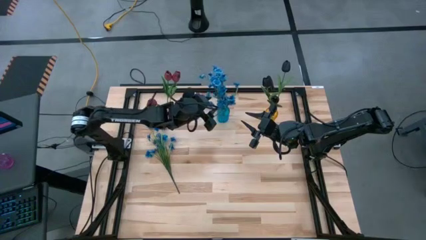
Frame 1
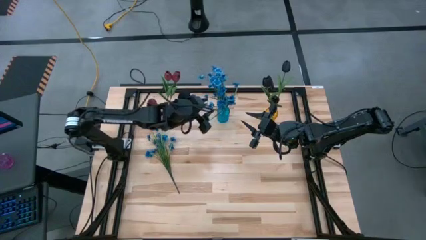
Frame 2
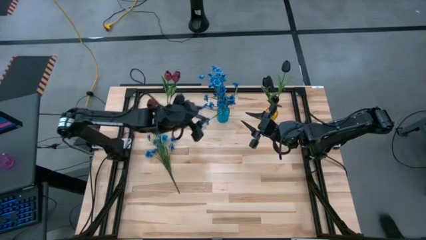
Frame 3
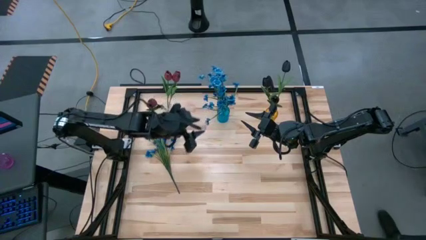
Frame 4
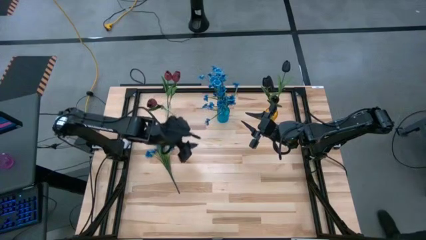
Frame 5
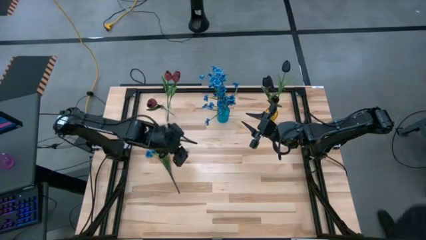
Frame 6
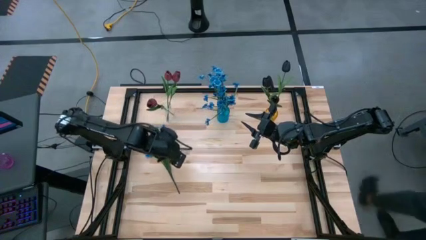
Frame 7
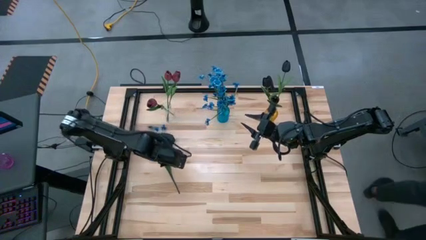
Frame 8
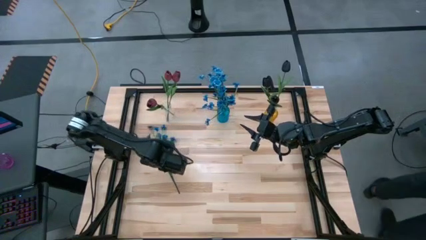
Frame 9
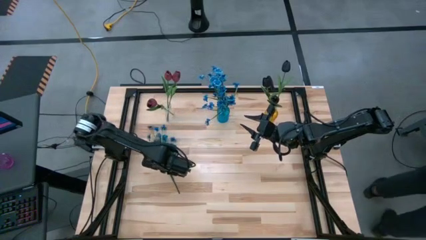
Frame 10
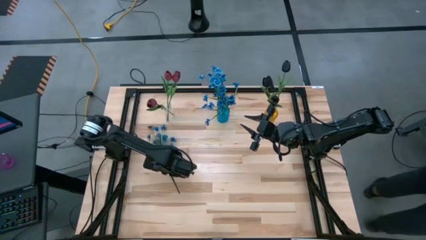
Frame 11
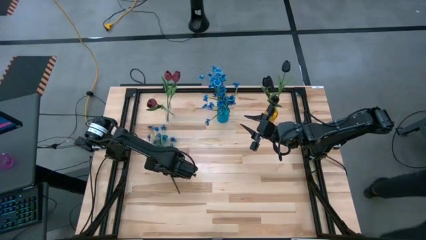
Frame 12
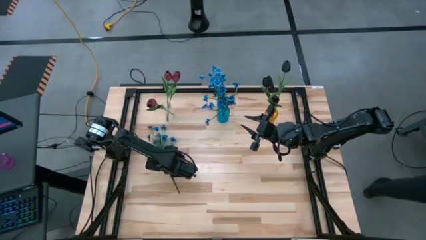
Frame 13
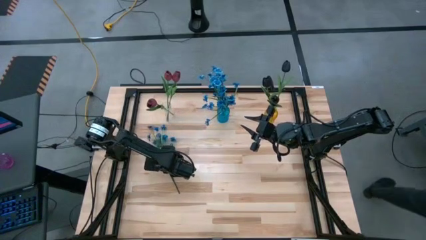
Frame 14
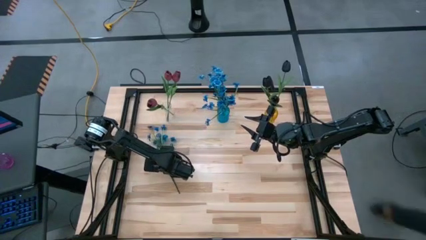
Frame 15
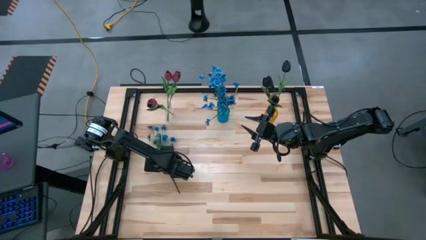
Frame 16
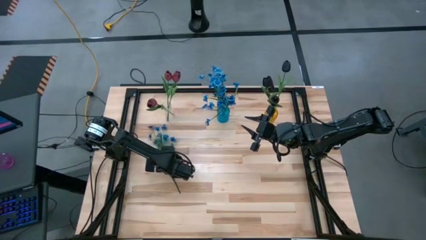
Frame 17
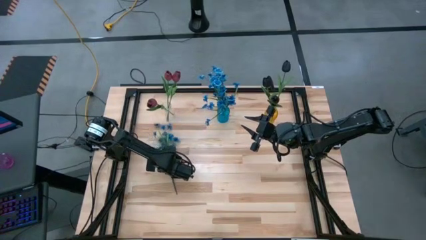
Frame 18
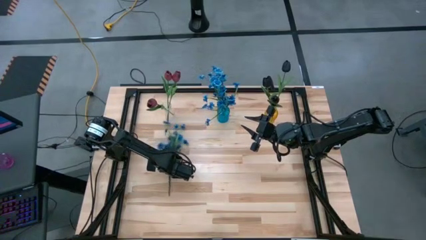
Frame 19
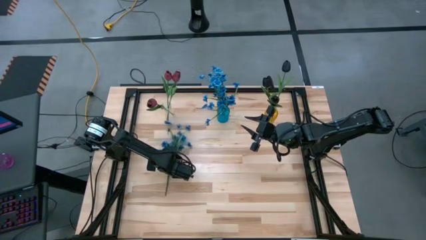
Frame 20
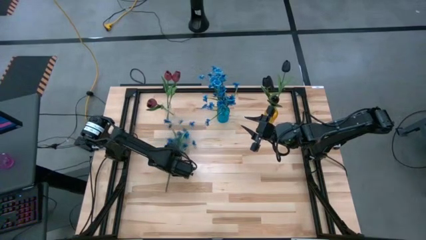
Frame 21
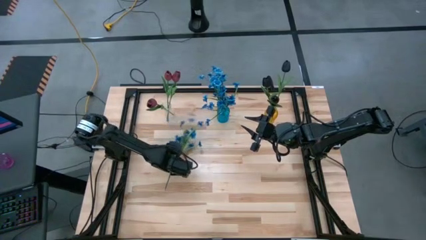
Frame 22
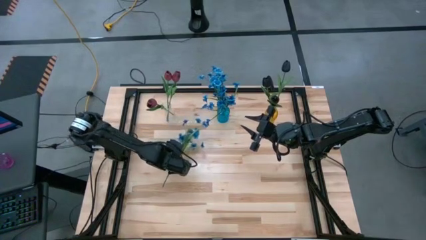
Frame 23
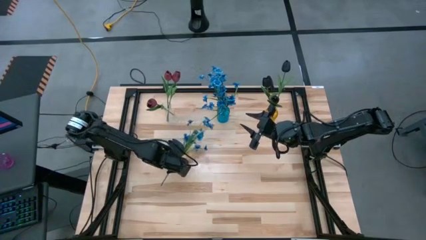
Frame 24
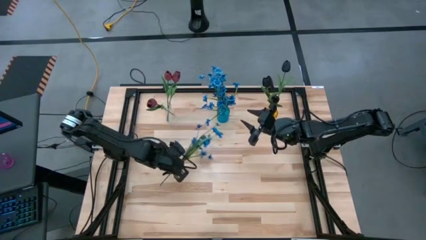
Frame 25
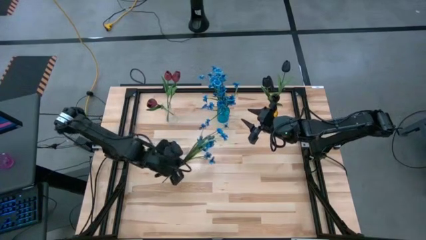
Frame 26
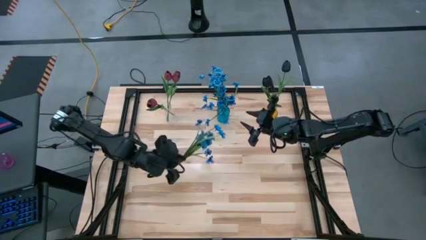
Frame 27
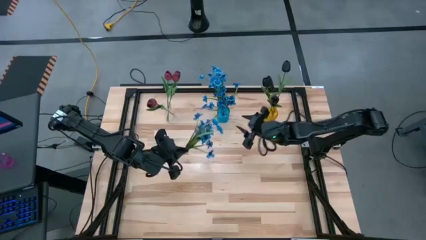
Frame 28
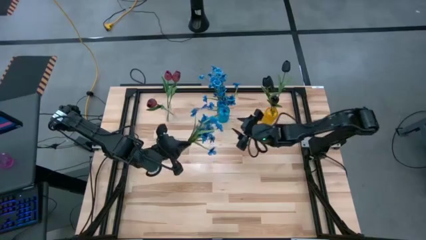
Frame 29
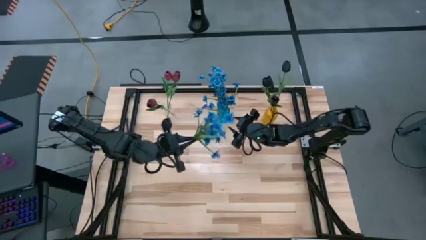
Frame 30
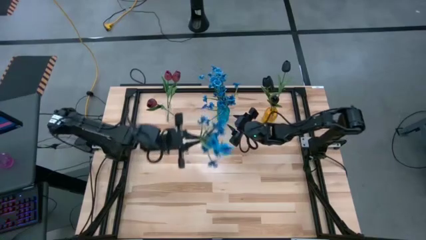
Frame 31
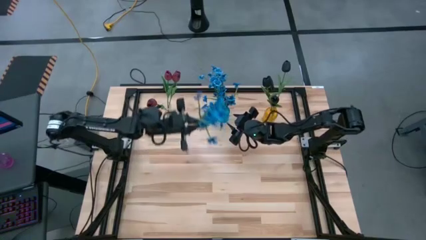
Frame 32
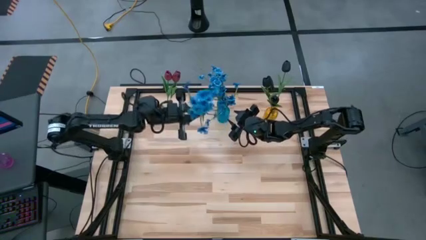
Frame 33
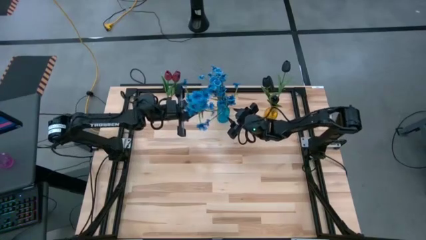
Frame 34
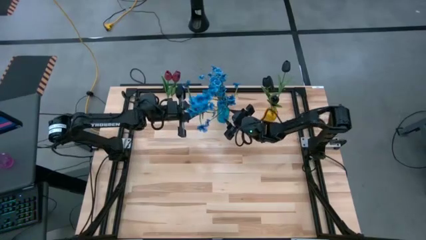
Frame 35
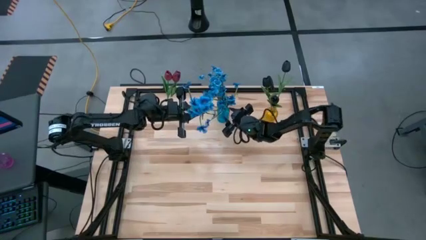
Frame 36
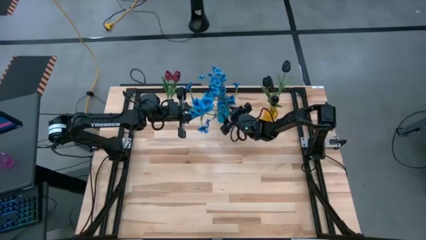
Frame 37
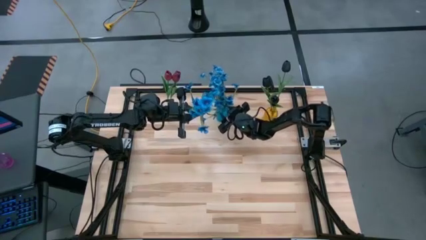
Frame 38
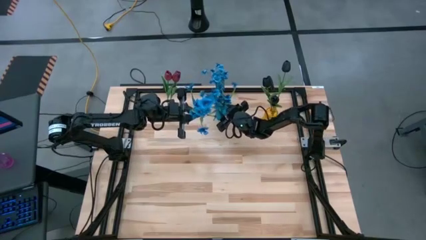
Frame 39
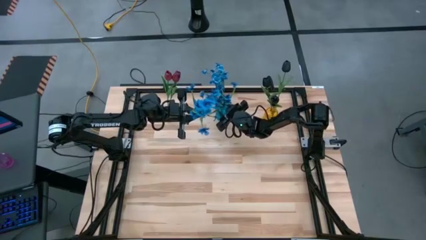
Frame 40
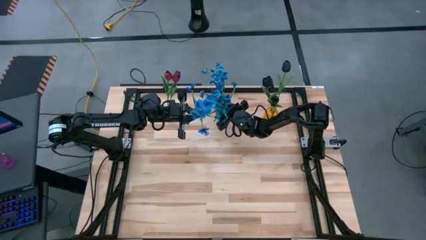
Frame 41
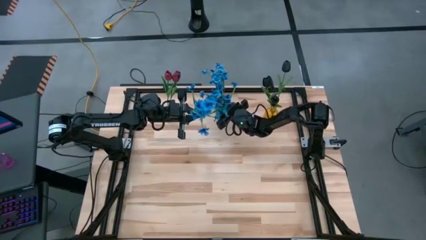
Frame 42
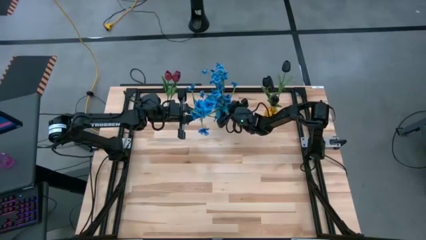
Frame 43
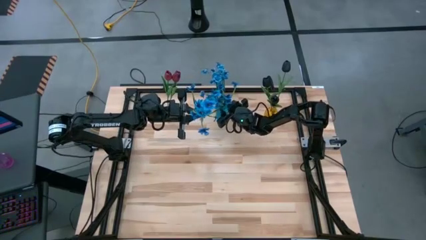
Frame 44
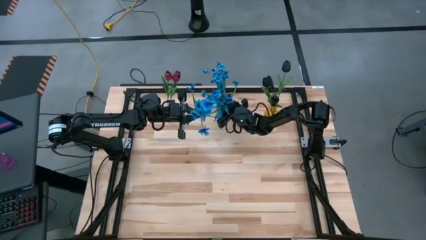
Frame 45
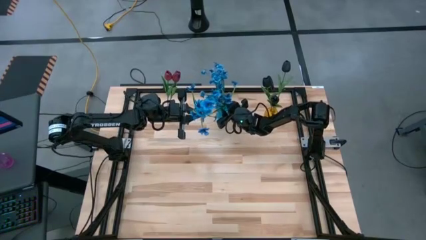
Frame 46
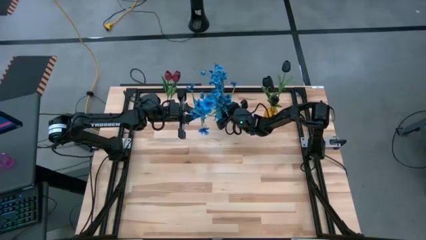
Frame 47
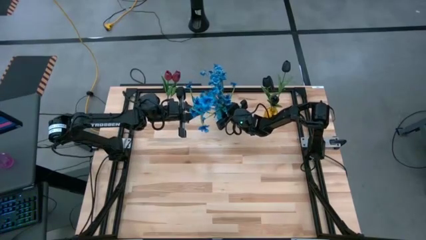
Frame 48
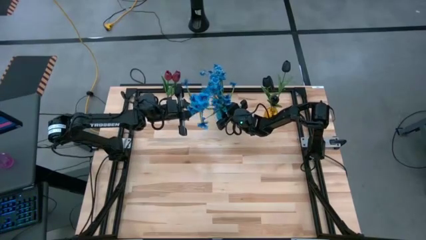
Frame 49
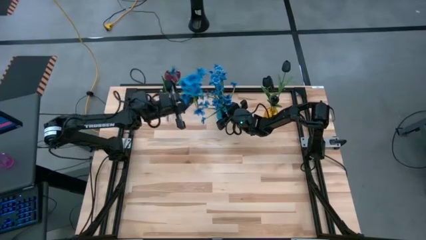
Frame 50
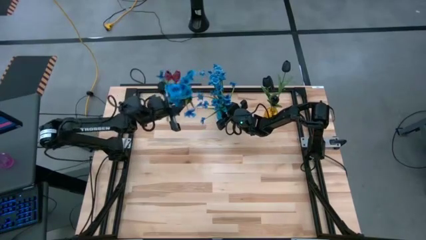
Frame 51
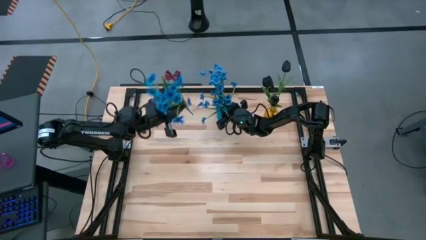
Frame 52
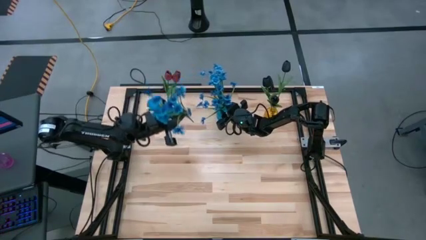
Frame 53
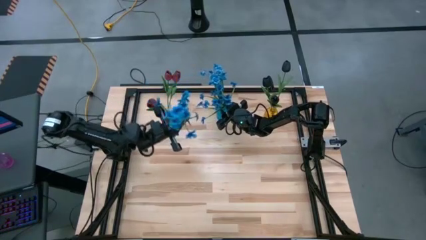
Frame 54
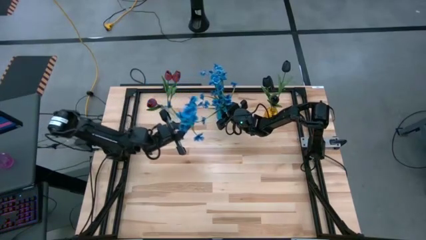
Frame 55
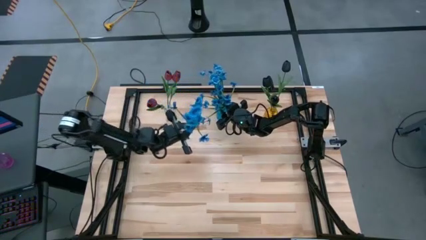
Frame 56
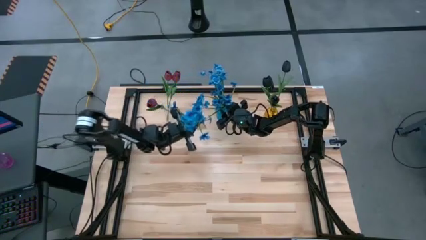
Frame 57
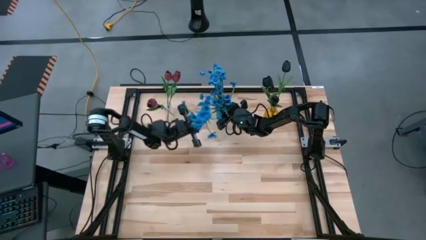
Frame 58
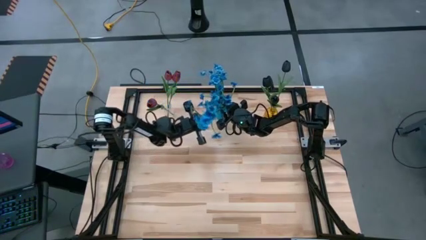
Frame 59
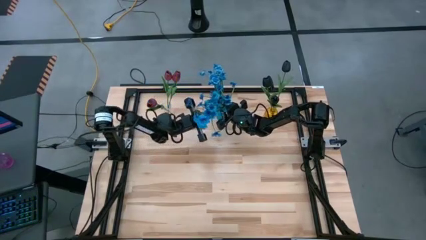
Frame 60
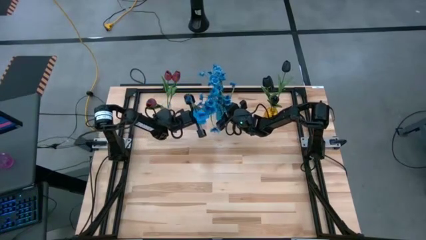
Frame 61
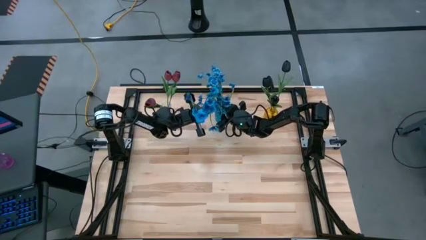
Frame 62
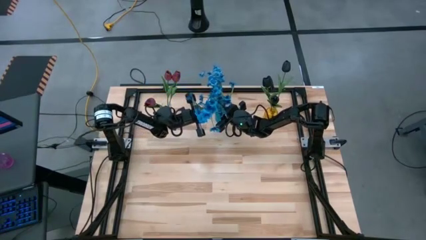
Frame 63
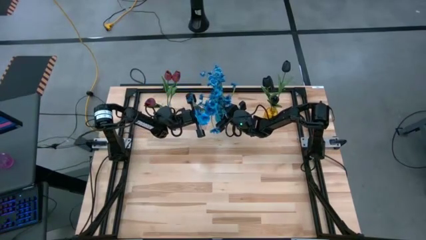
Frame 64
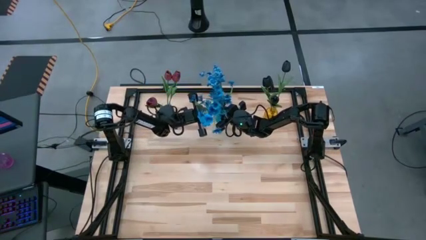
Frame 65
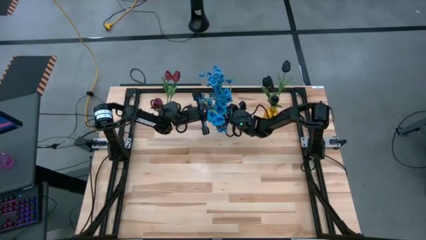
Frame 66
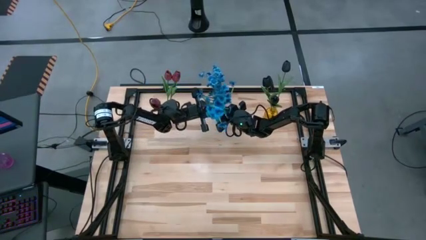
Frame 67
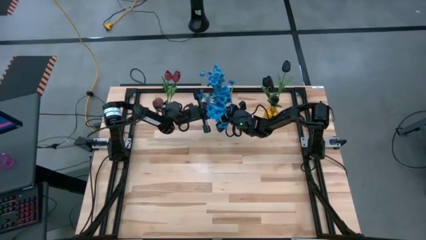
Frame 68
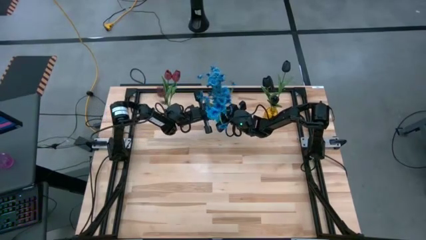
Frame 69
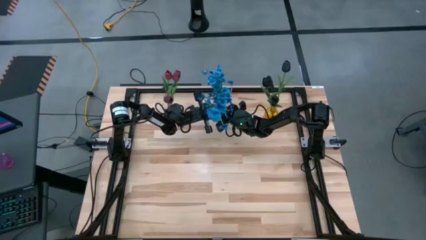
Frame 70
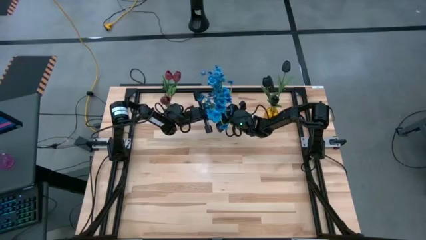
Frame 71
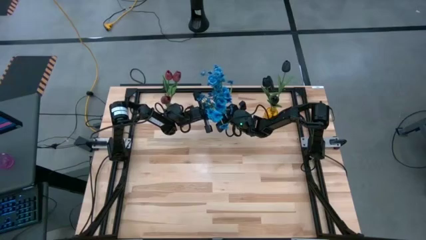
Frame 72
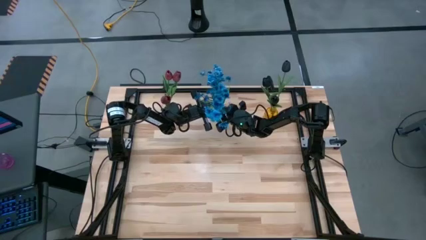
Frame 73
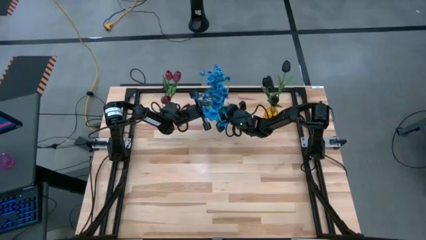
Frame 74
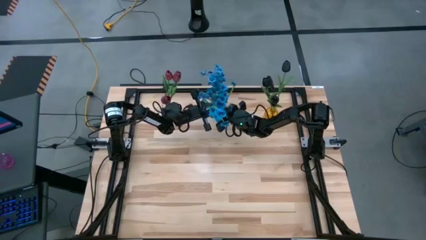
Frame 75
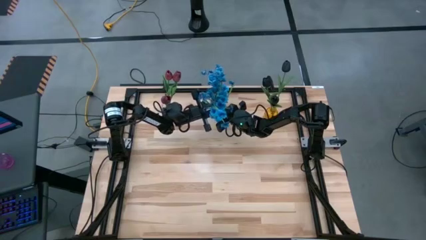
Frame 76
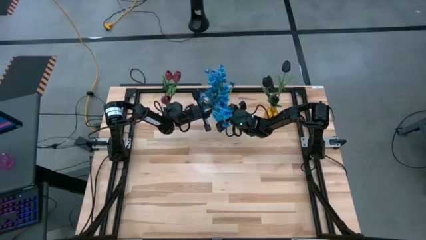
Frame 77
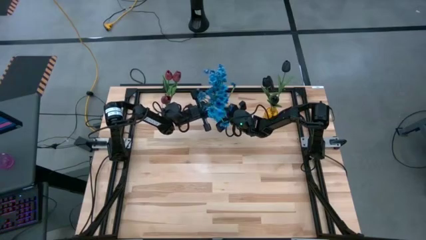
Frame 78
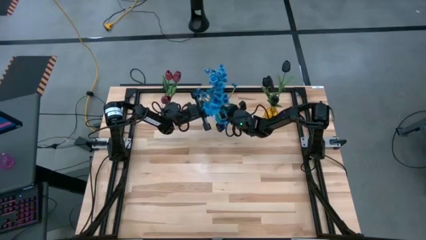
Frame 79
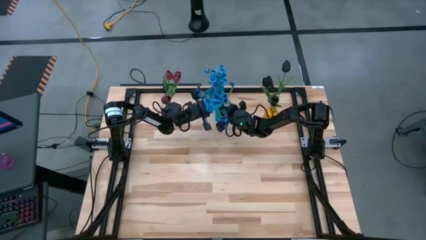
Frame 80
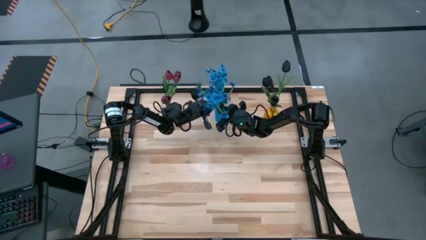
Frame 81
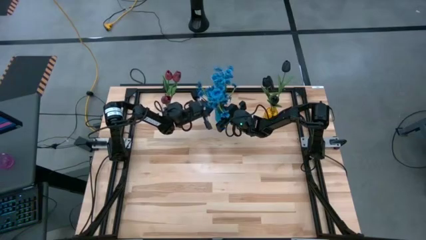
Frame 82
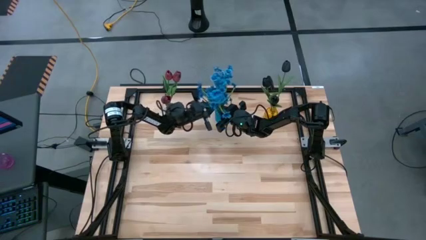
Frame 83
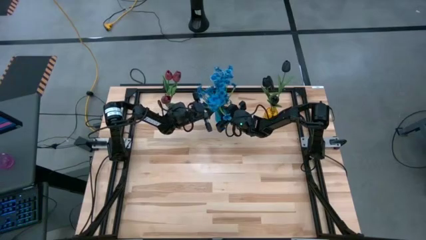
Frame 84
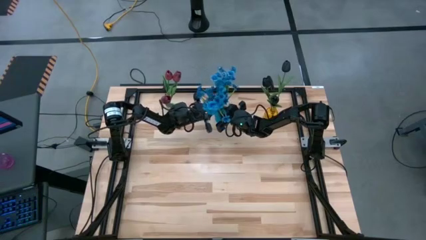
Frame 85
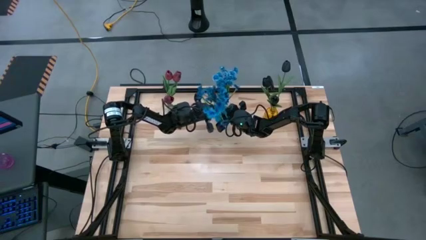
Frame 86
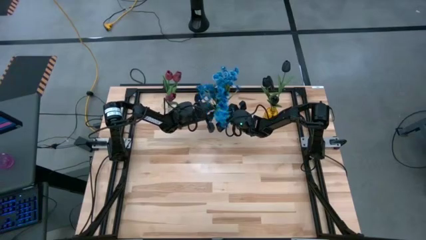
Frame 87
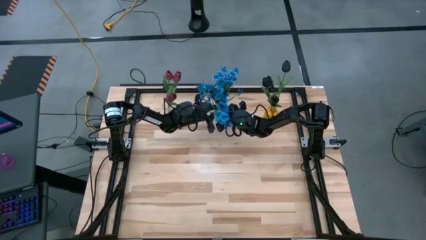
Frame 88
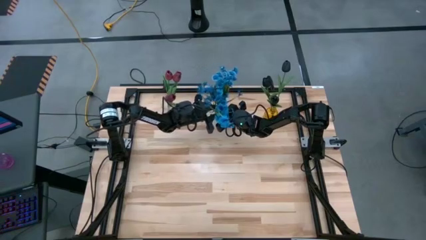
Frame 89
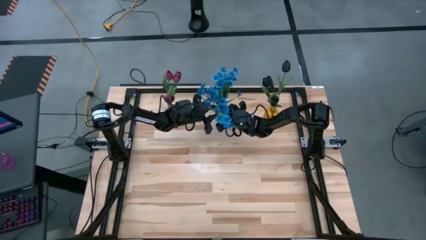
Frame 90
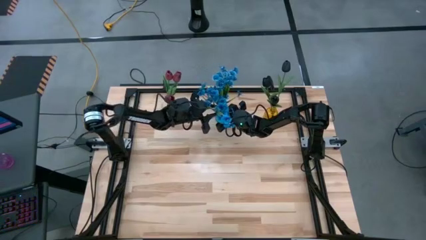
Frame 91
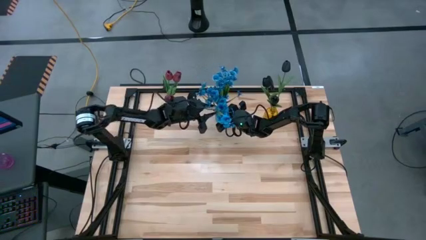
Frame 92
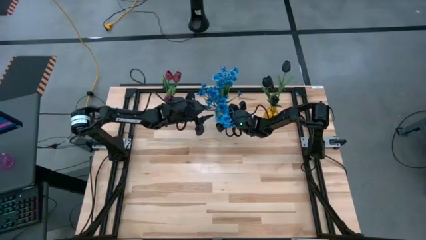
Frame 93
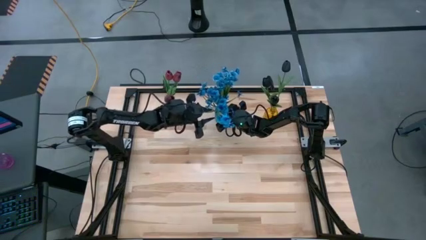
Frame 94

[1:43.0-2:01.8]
Task: Sort flowers into vase by color
Put the blue flowers into the blue vase
